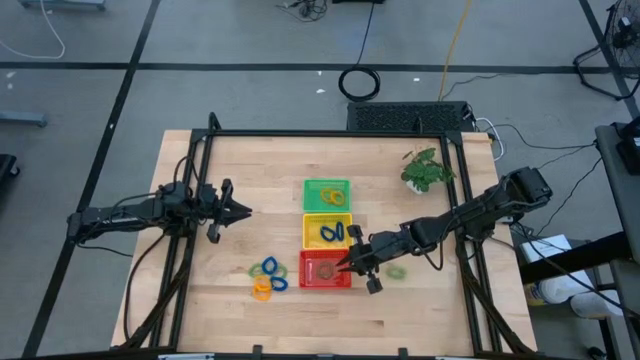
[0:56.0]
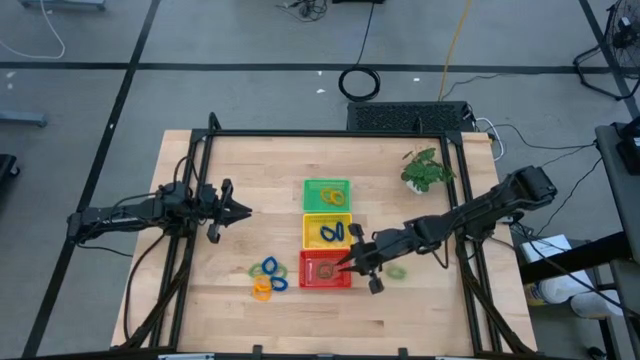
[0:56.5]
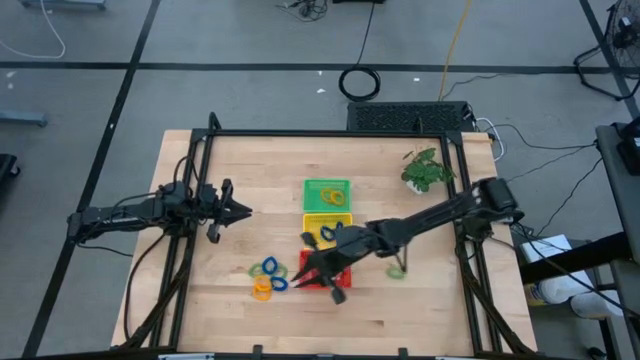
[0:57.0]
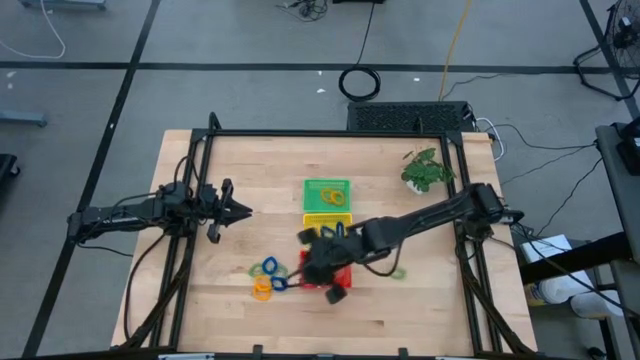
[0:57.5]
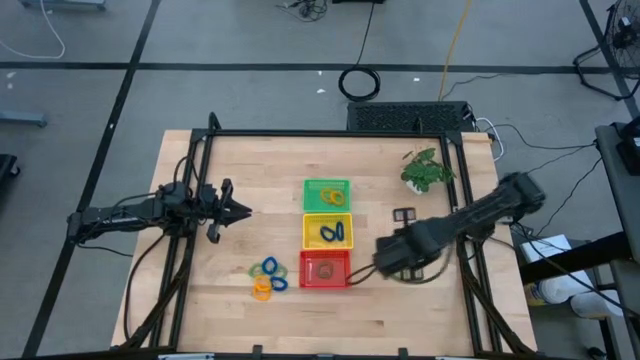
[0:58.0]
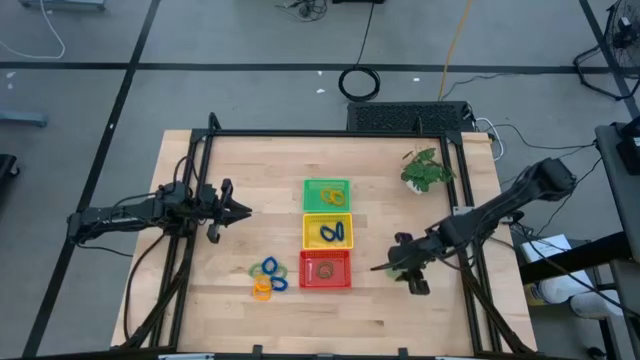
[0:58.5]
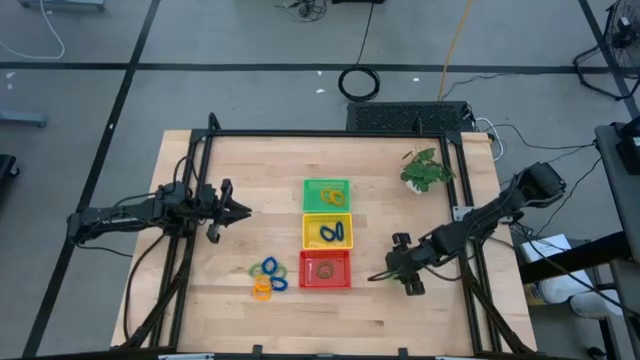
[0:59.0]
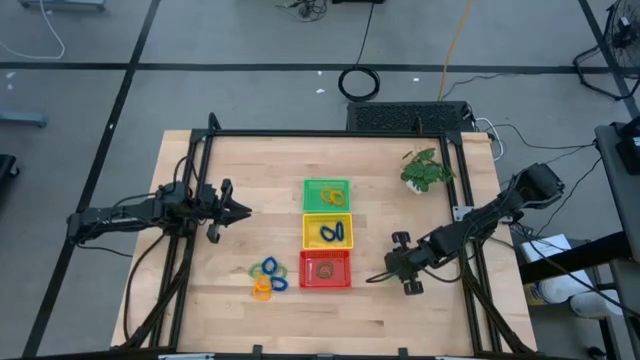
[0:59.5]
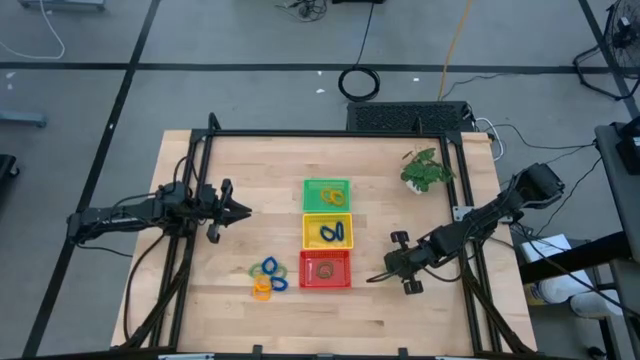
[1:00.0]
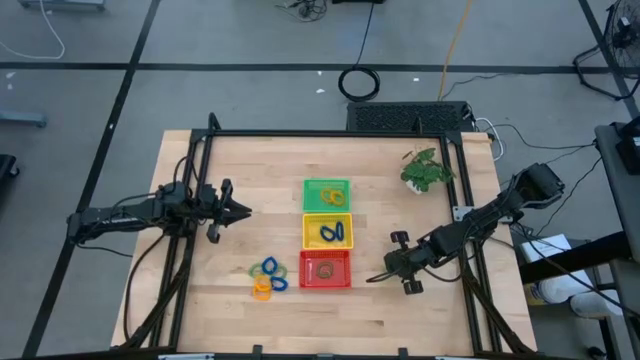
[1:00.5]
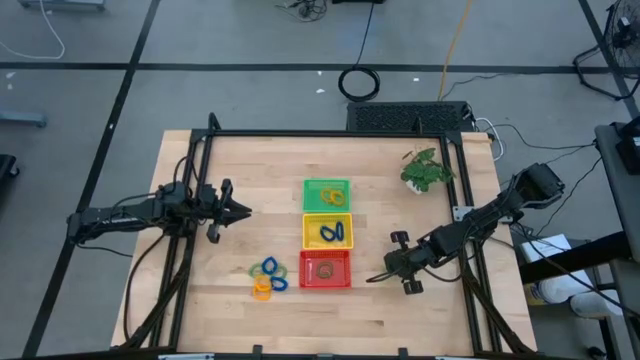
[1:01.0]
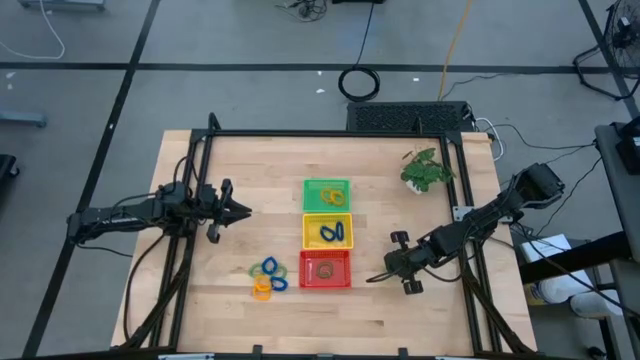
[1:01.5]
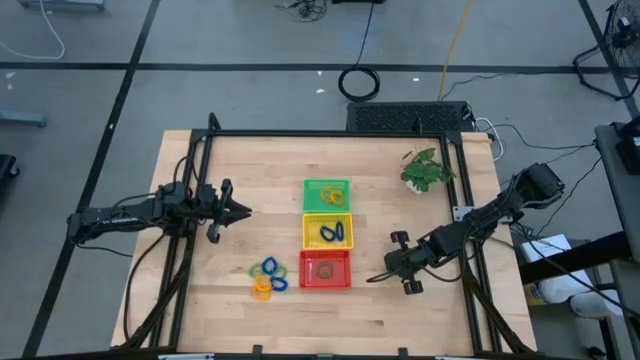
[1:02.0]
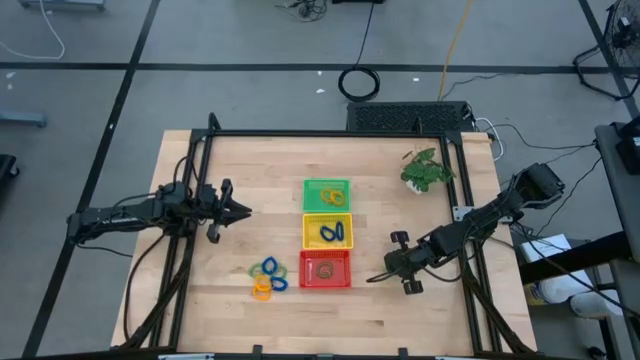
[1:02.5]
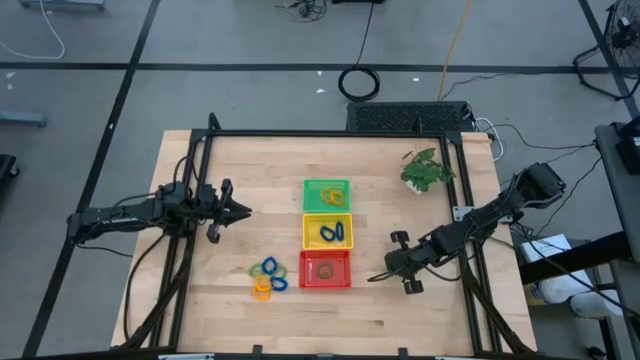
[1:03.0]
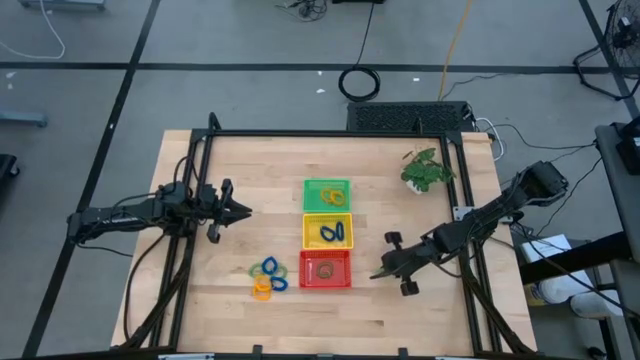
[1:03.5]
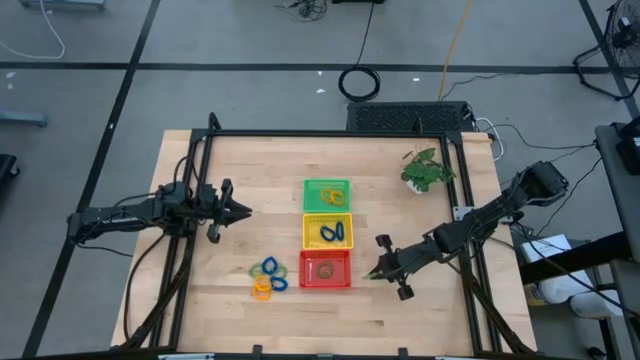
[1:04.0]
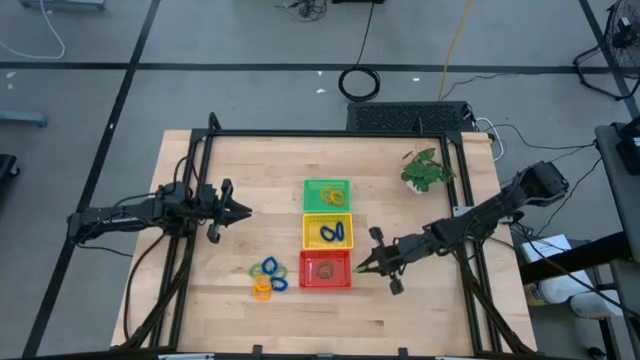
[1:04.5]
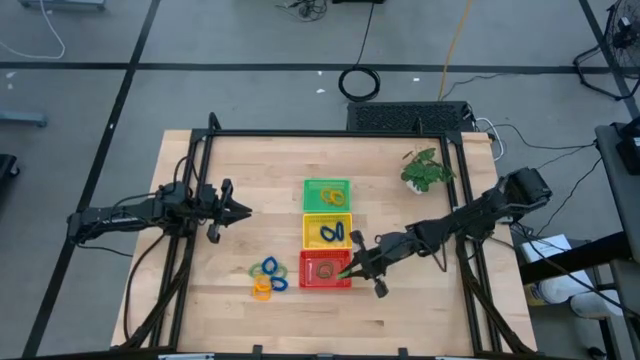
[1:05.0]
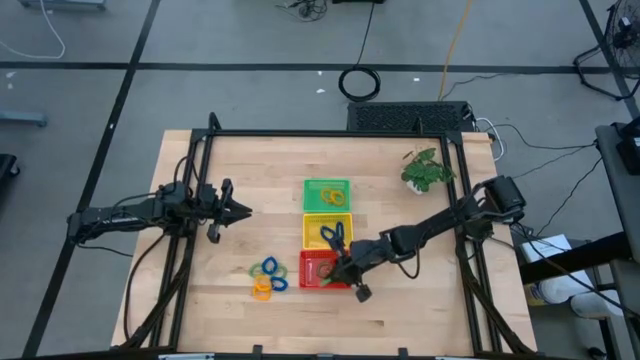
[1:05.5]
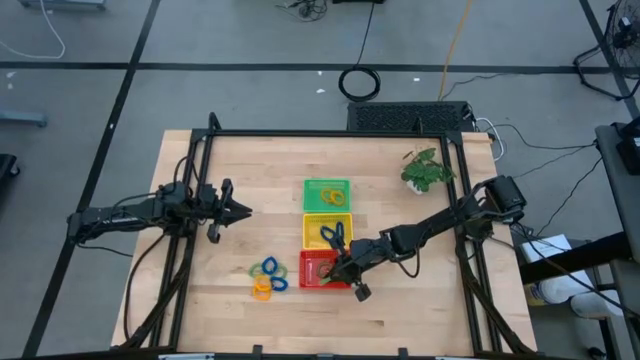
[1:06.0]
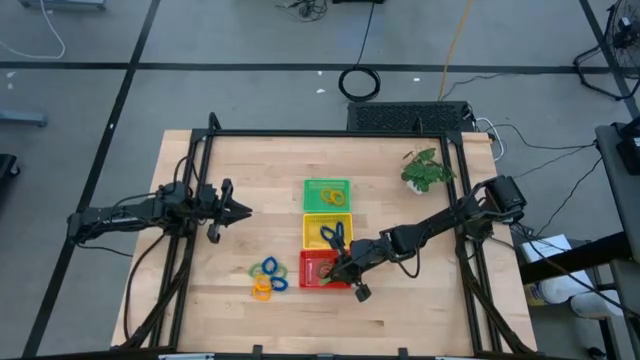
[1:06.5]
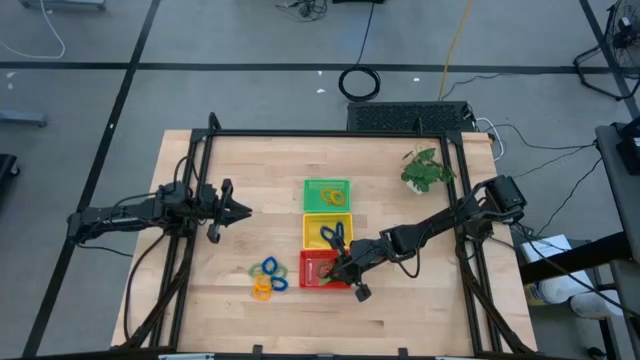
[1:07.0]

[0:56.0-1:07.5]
Task: Sort spring keychains into baskets
Put the green spring keychain into the red basket

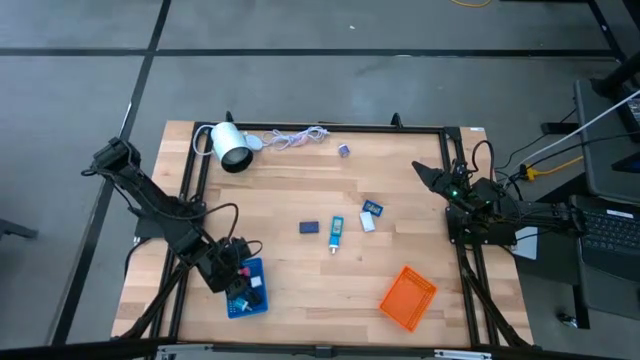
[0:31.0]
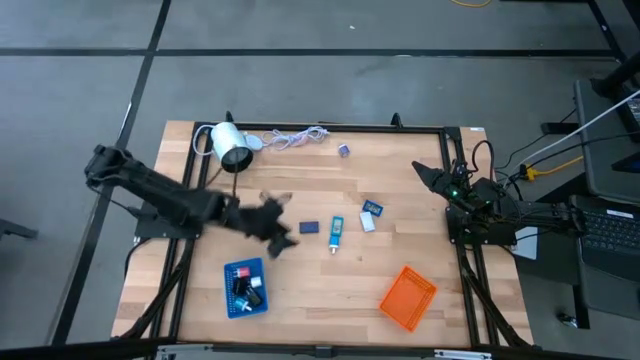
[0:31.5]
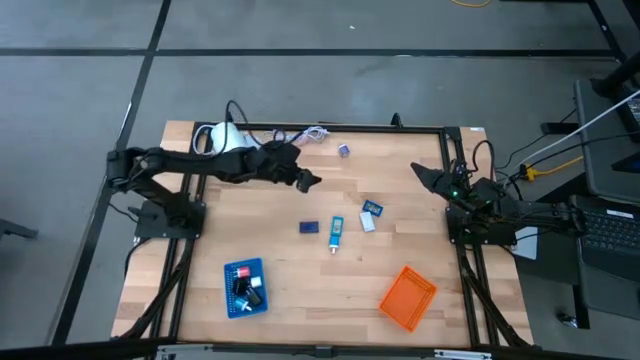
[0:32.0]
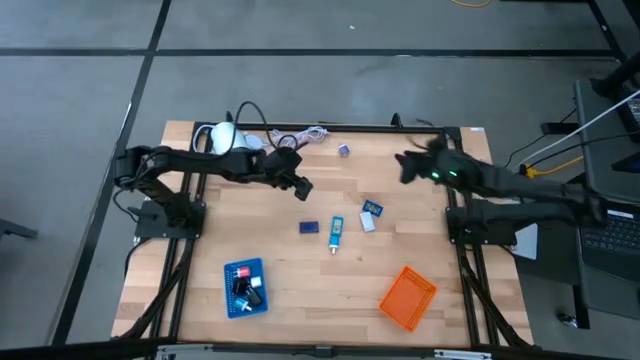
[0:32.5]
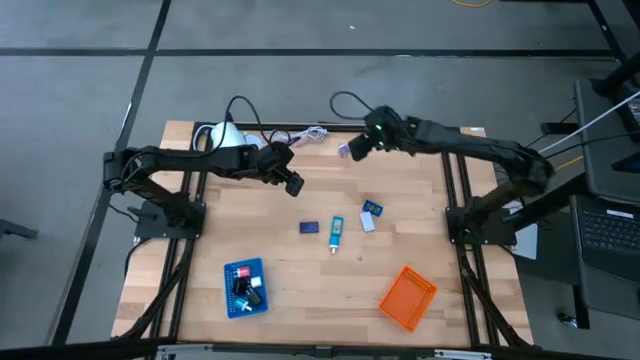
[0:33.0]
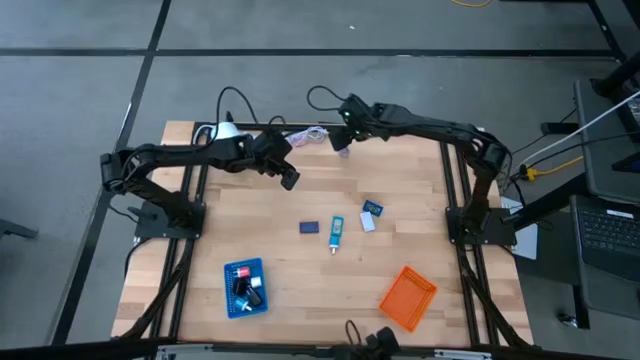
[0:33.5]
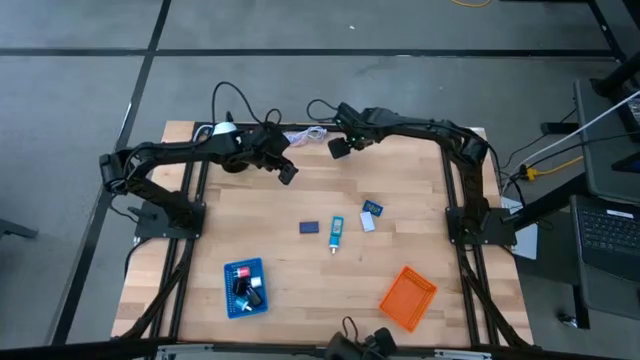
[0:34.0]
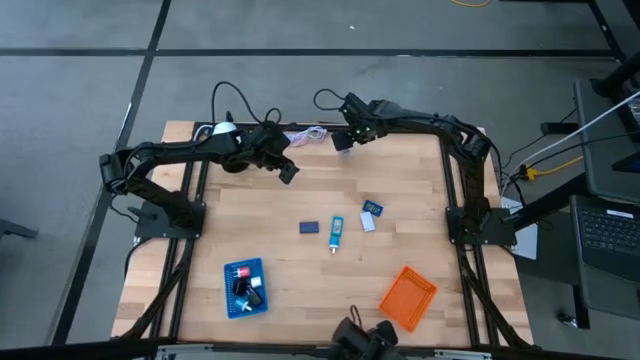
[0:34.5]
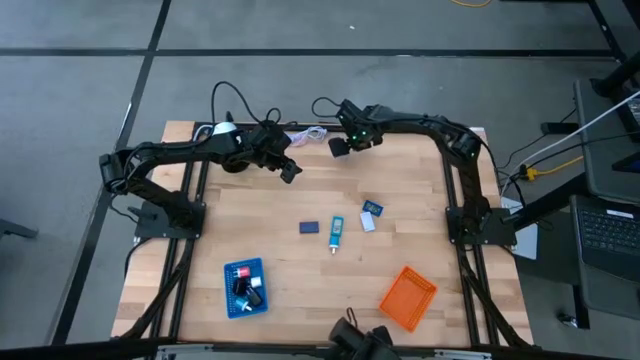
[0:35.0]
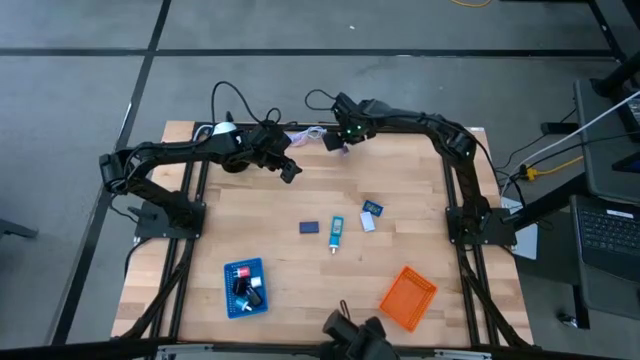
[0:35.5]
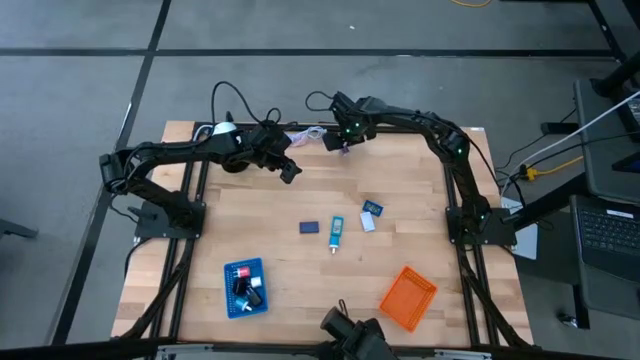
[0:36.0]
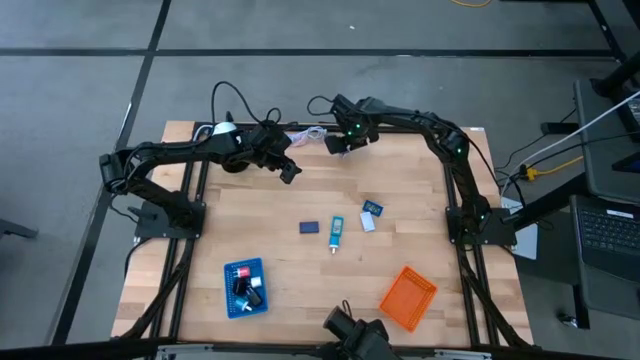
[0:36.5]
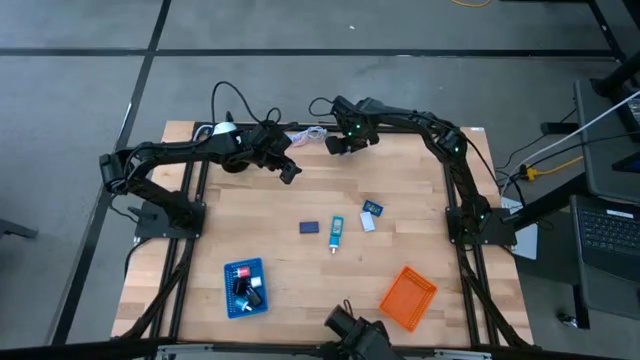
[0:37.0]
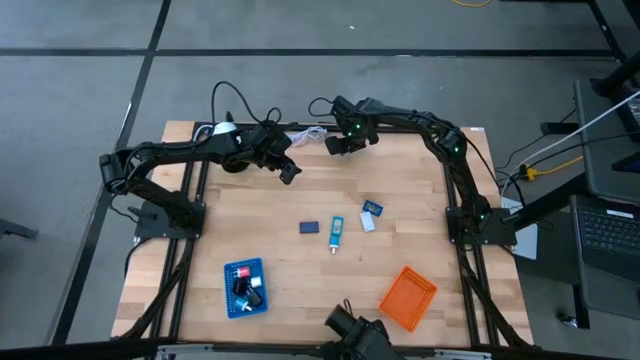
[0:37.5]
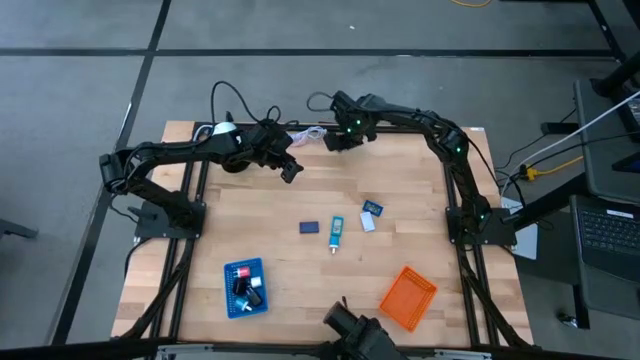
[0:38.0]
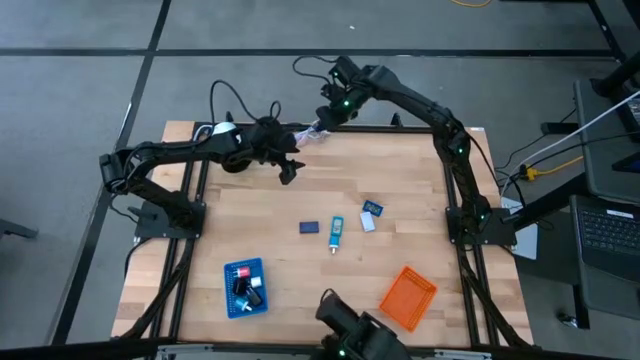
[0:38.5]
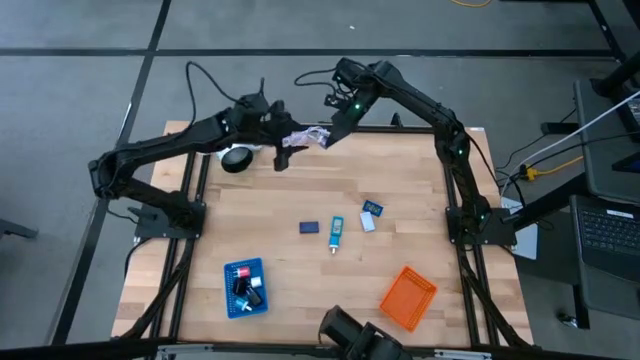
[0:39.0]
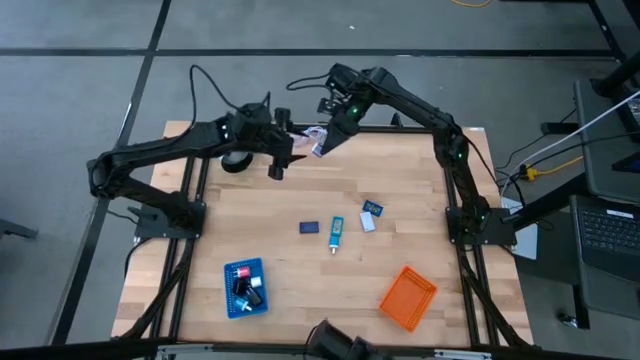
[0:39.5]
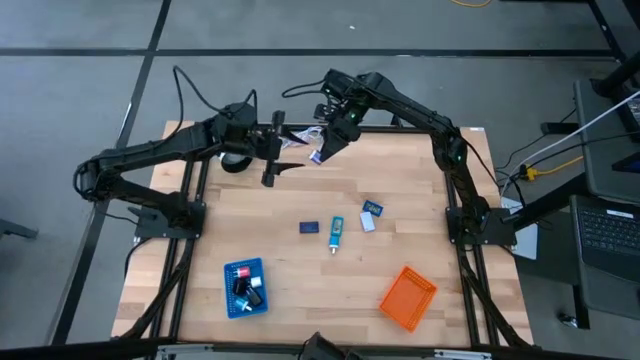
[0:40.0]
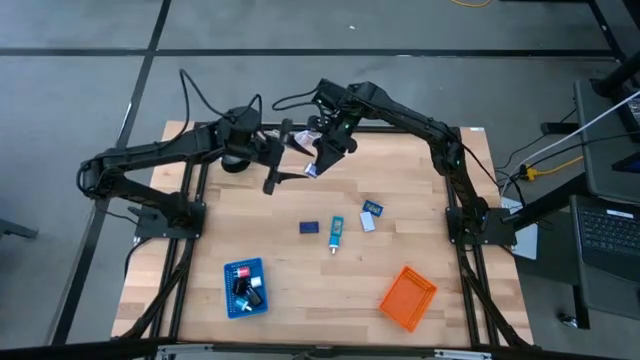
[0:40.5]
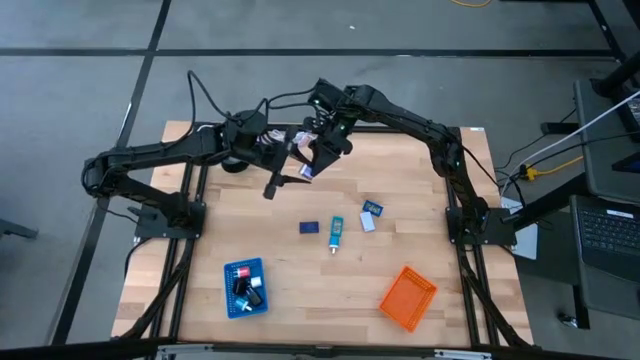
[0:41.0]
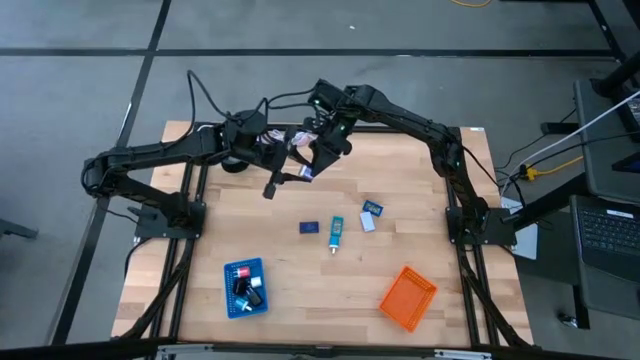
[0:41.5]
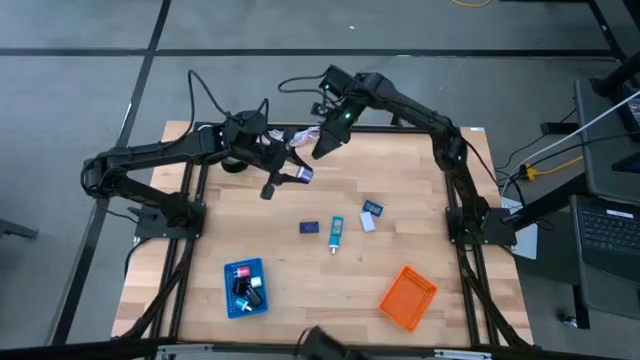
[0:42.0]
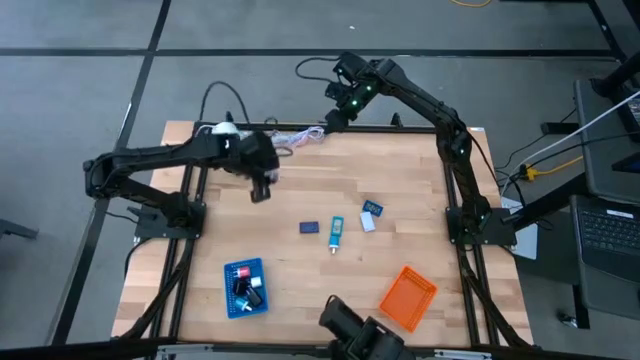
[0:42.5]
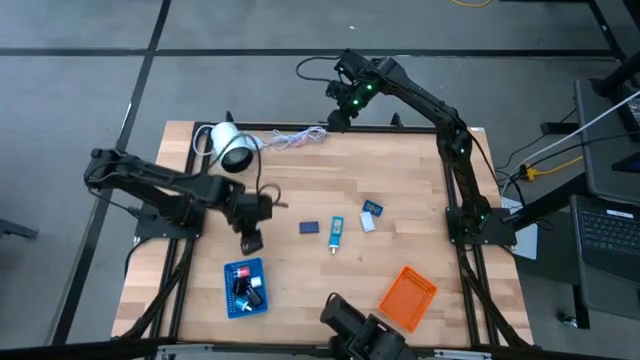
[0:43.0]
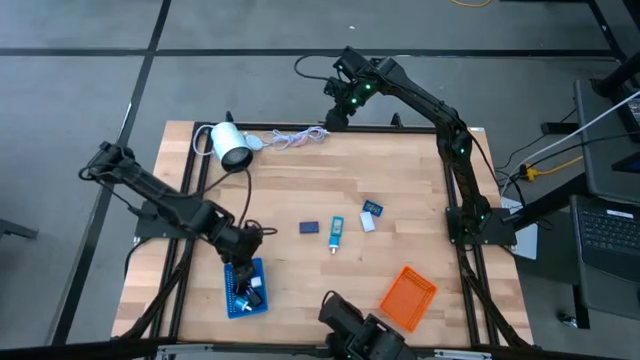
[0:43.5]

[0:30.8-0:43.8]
Task: Pick & Place Office items
Put the purple charger adapter into the blue basket
